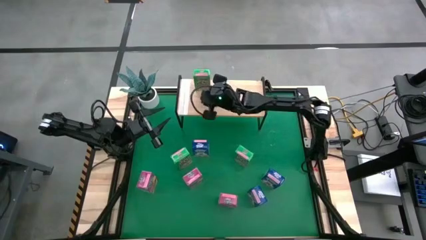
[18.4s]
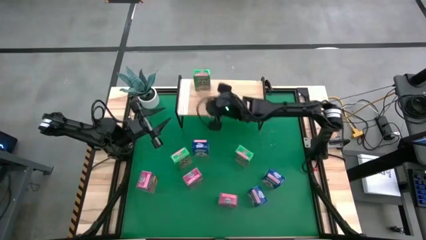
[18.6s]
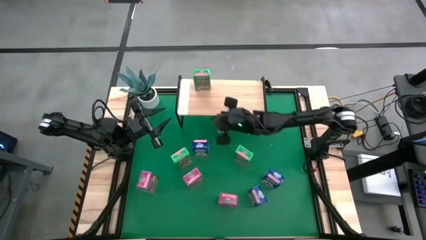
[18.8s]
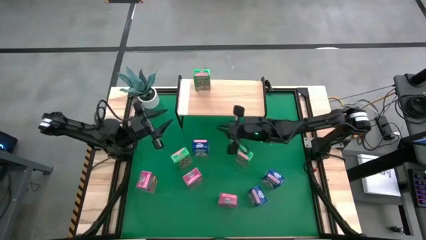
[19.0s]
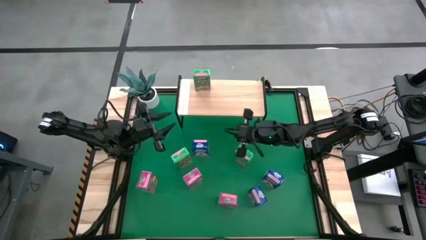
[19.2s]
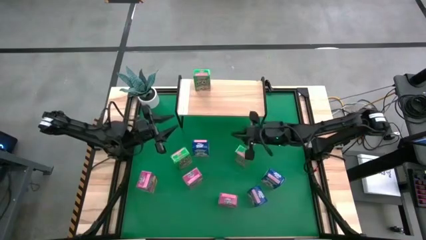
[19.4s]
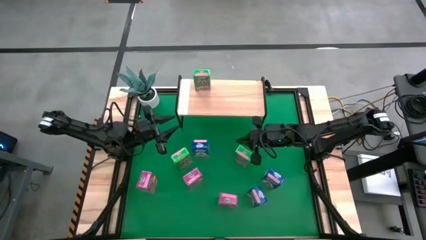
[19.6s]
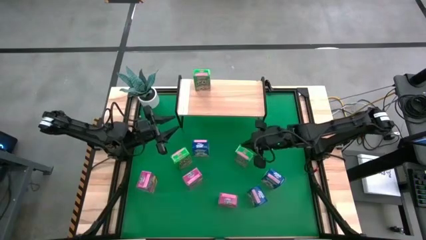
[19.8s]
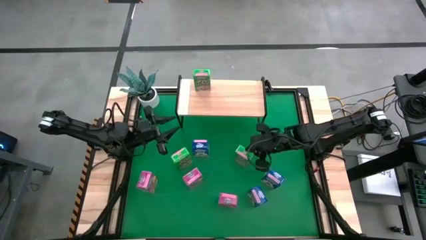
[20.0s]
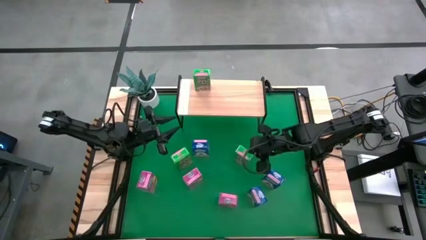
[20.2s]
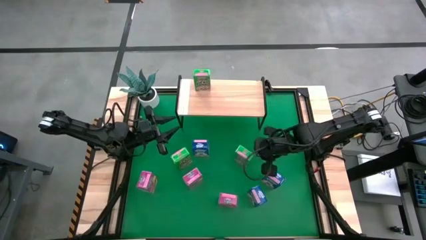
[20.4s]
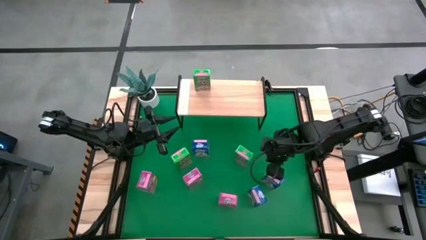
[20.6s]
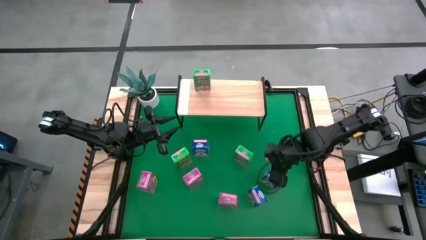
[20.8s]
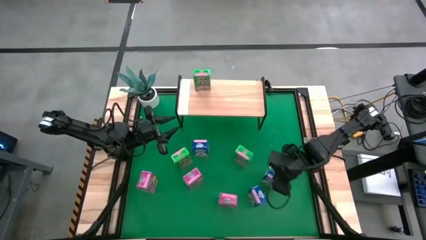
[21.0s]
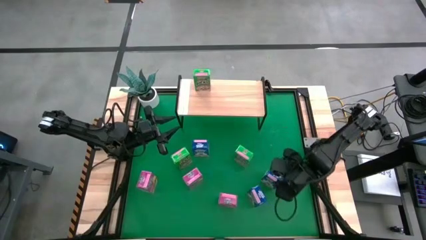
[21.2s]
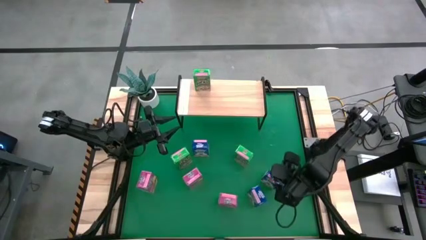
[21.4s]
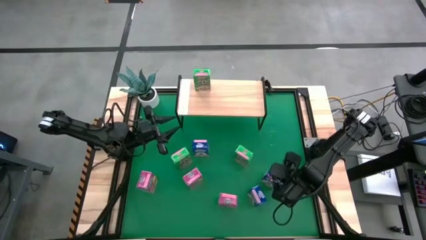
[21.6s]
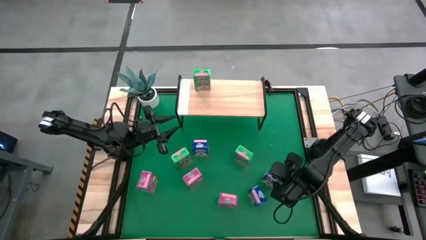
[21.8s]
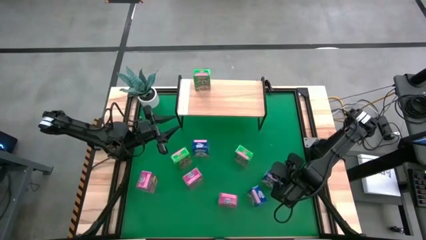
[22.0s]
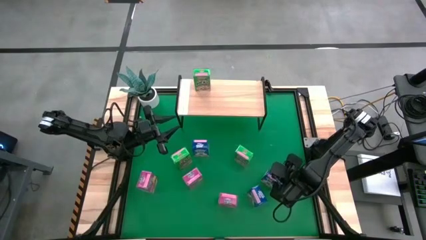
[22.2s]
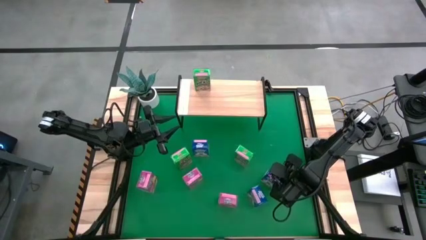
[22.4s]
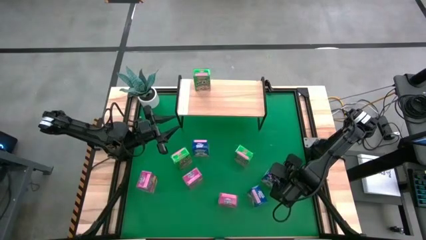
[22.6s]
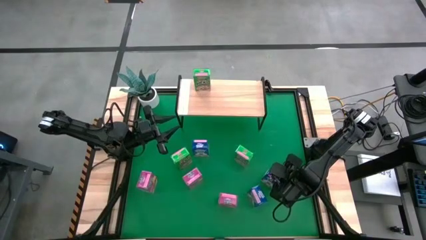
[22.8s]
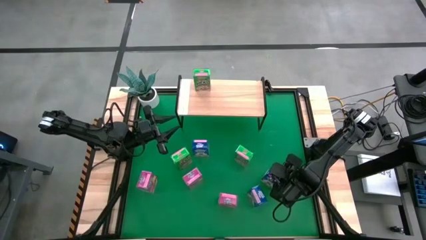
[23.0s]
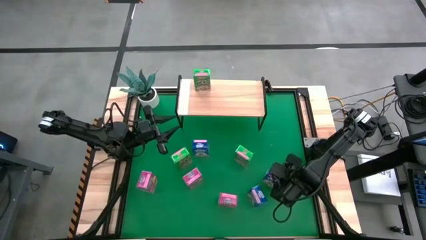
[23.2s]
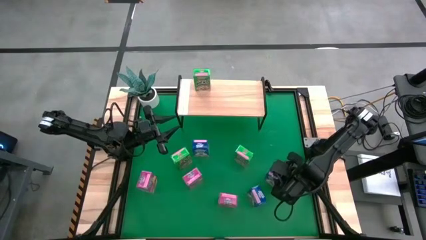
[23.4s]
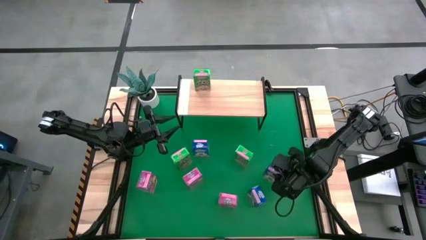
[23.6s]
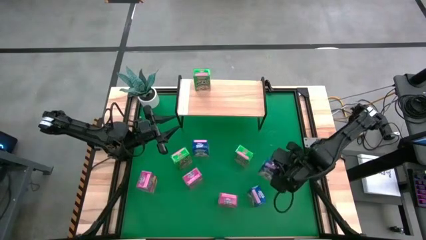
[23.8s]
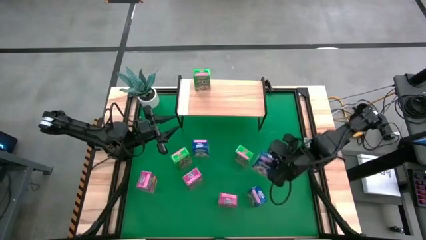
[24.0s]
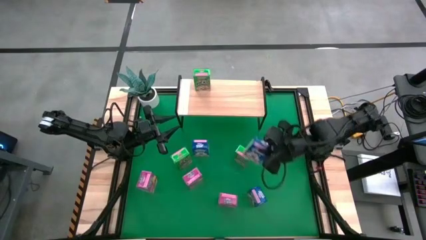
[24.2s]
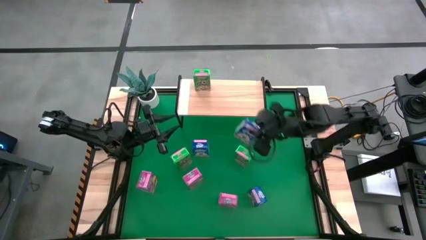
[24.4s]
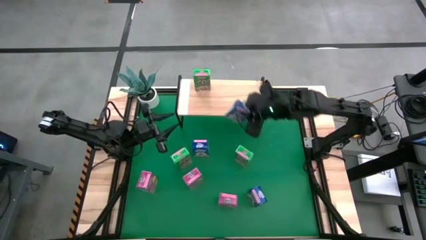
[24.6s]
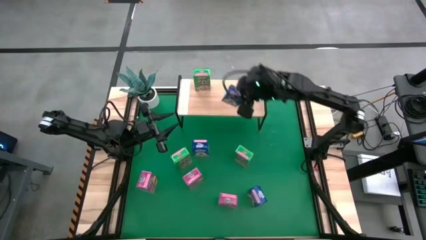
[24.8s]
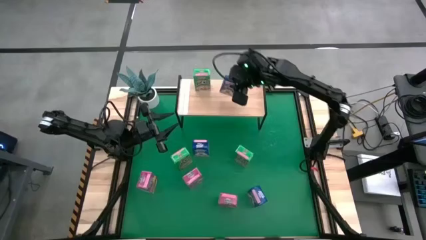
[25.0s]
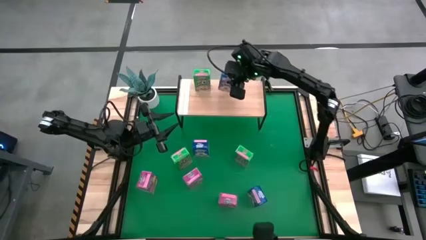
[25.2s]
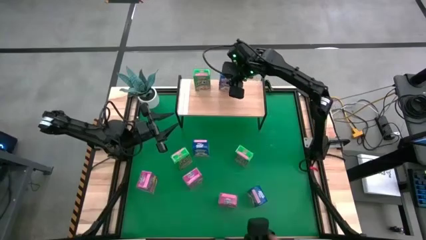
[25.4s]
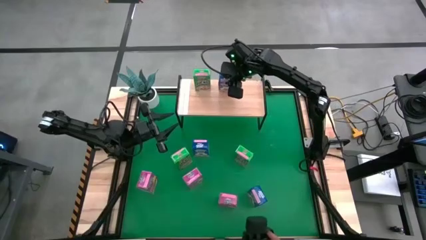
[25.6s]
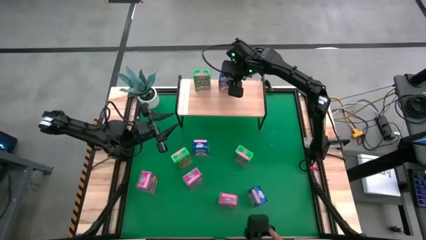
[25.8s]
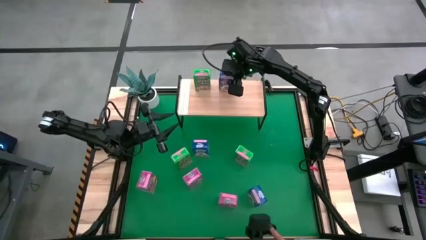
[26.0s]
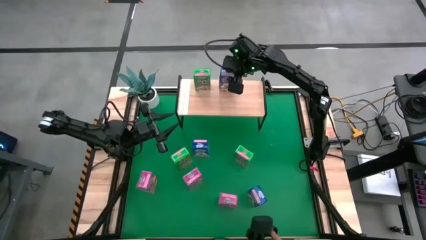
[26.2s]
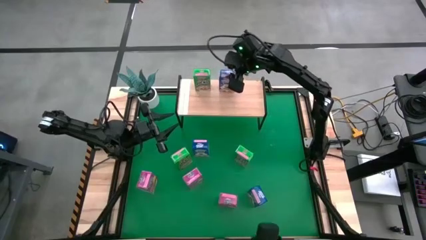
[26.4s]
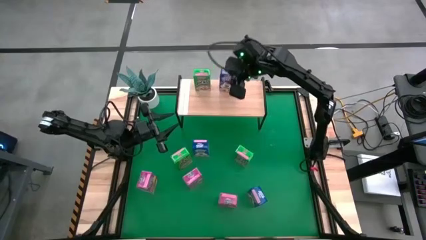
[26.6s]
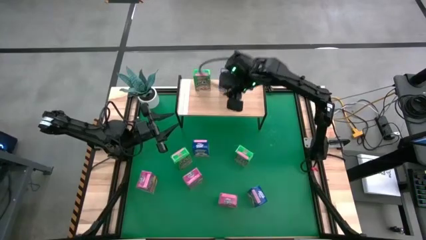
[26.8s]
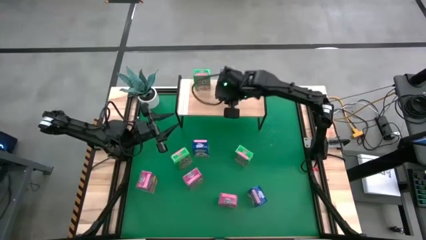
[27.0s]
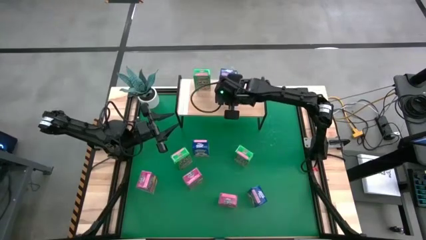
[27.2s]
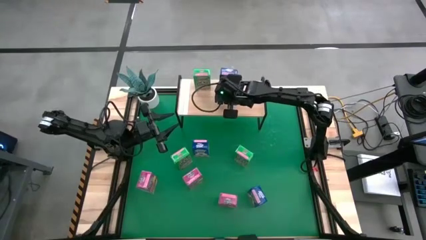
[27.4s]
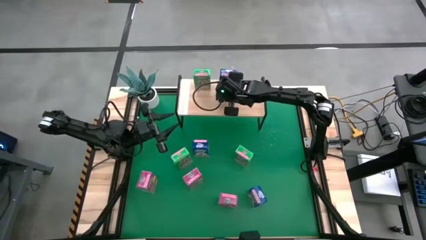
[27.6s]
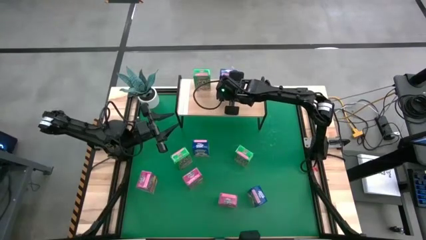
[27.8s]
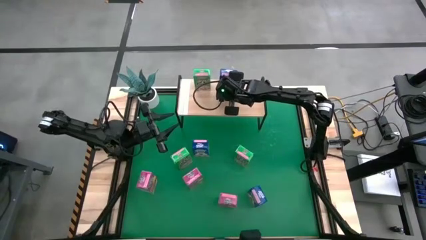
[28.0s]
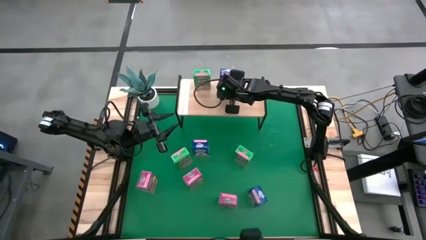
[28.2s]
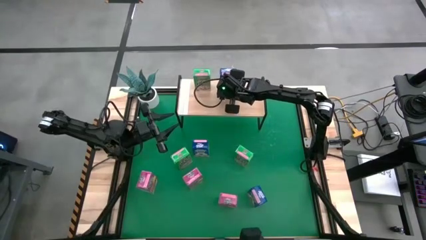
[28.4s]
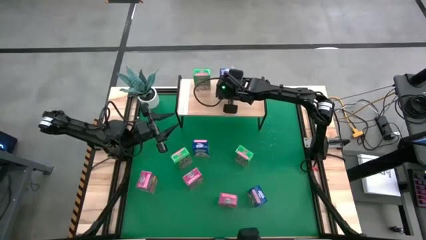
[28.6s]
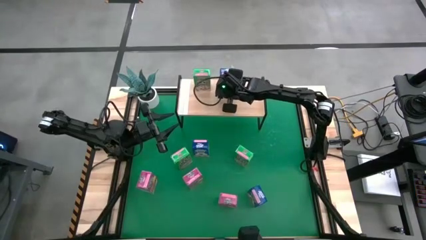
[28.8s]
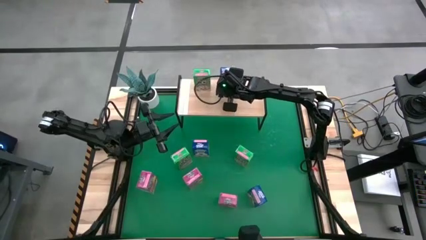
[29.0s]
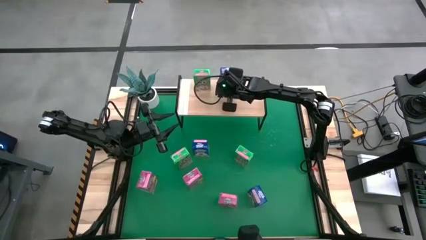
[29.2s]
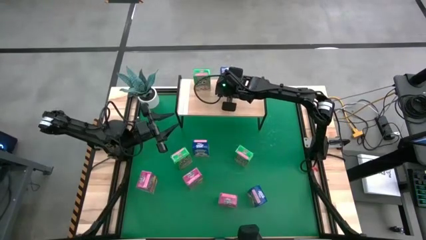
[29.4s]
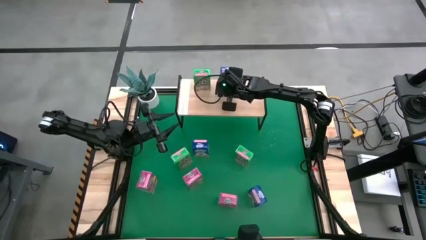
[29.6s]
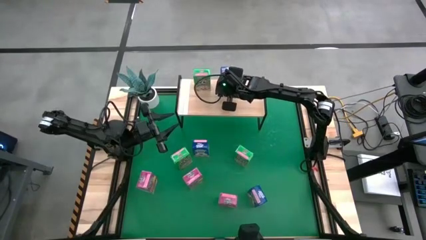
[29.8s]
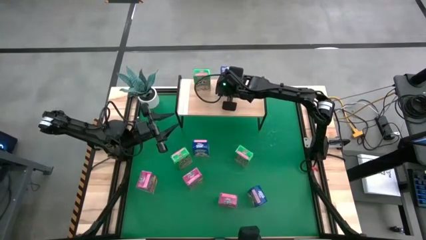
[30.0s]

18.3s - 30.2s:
Task: Stack cereal on shelf
Put the right blue cereal box on the shelf
